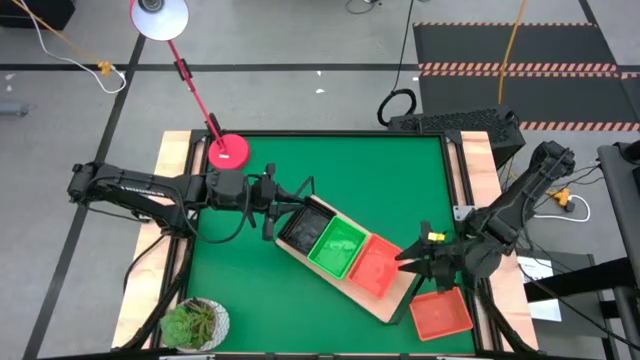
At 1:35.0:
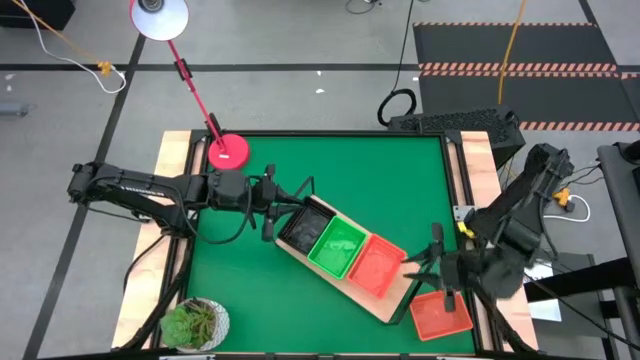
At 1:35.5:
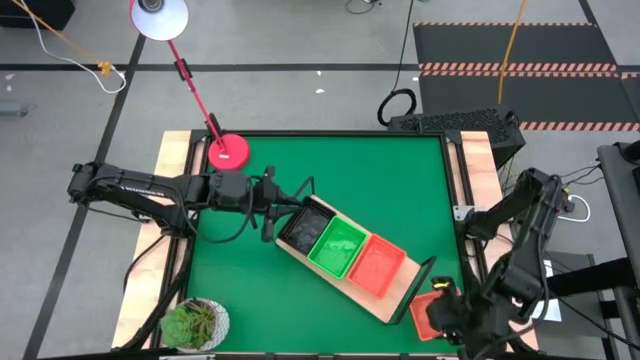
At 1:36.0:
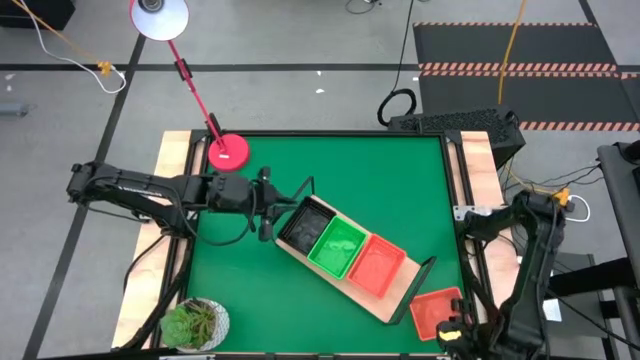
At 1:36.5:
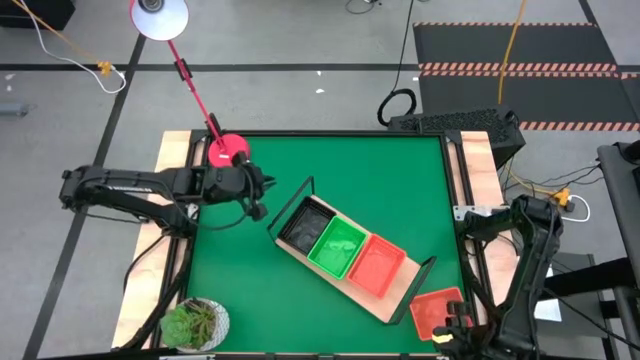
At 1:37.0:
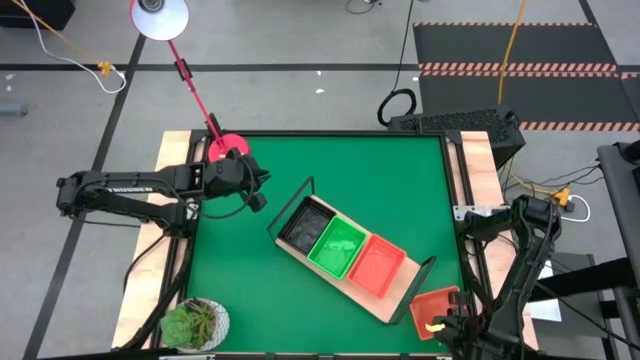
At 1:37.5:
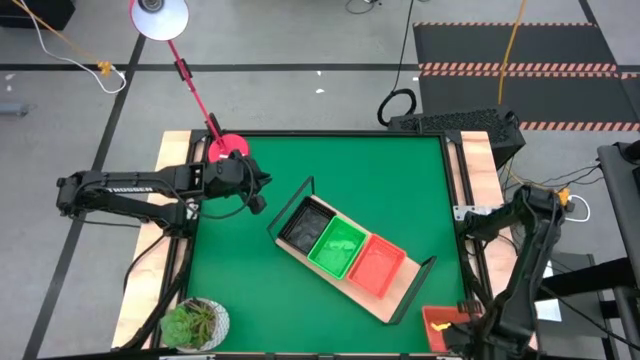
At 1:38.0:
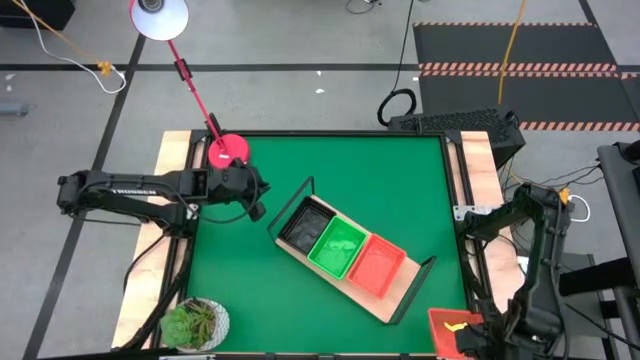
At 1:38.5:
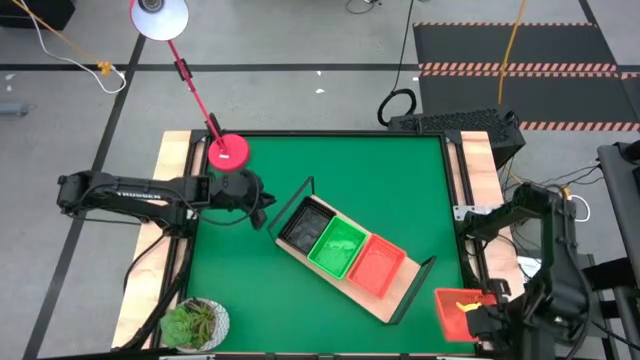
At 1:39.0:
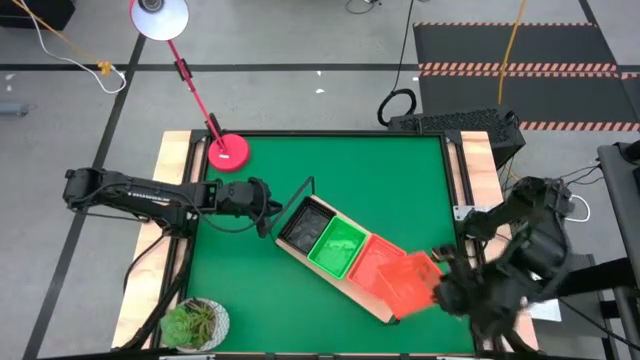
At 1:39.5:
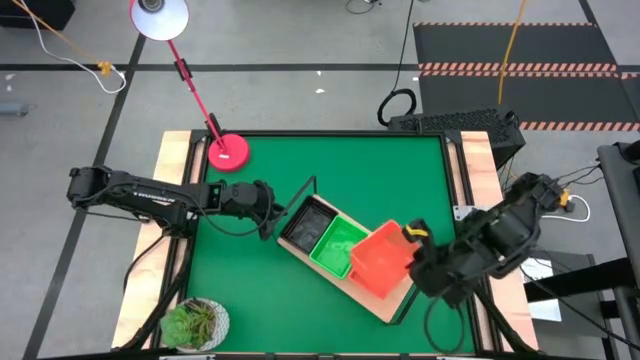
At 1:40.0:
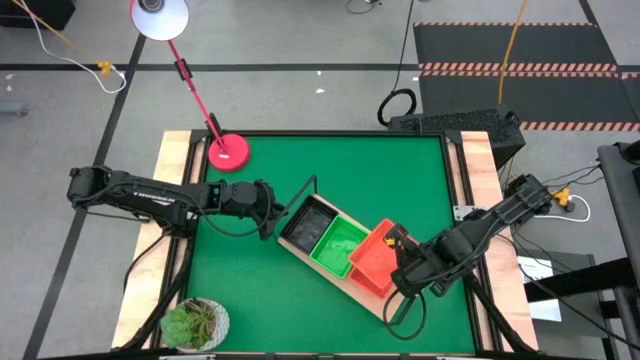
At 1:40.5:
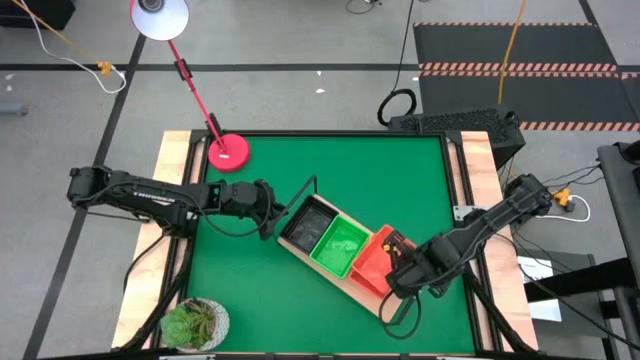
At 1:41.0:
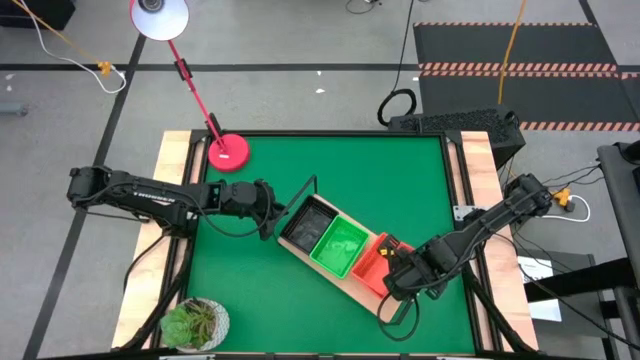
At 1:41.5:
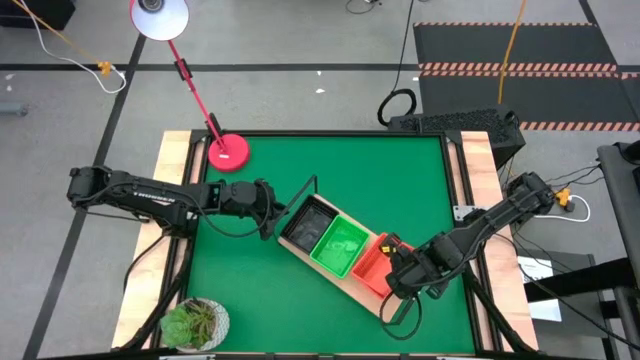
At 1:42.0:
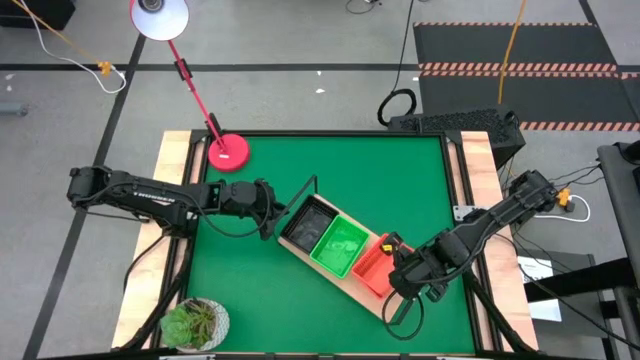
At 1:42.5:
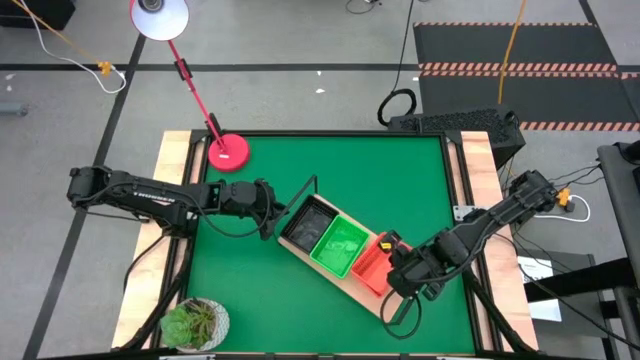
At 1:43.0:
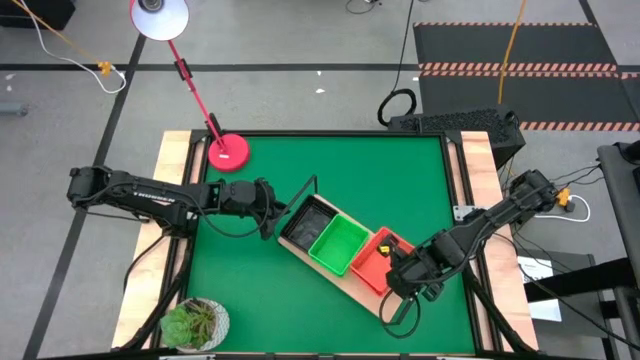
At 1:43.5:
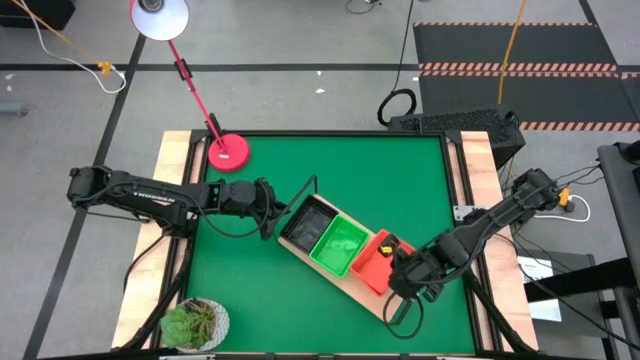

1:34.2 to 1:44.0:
Task: Stack baskets on shelf by color
Stack the orange bin on the orange bin on the shelf

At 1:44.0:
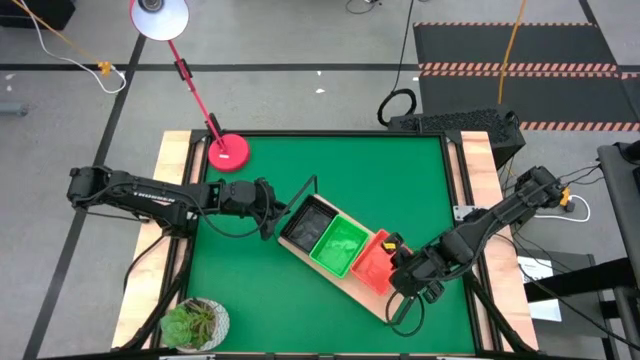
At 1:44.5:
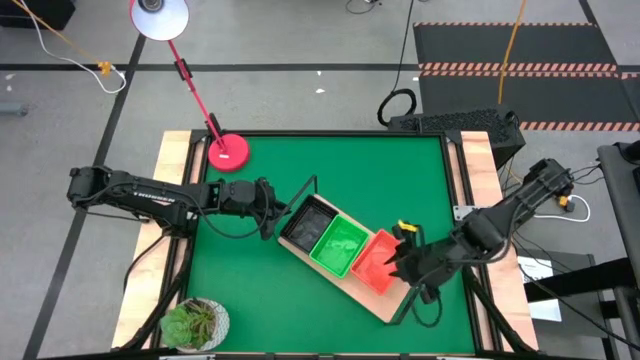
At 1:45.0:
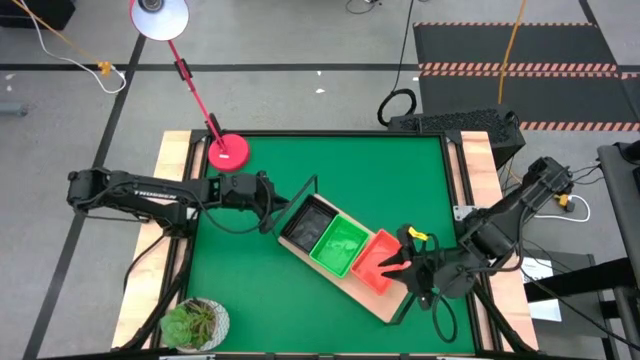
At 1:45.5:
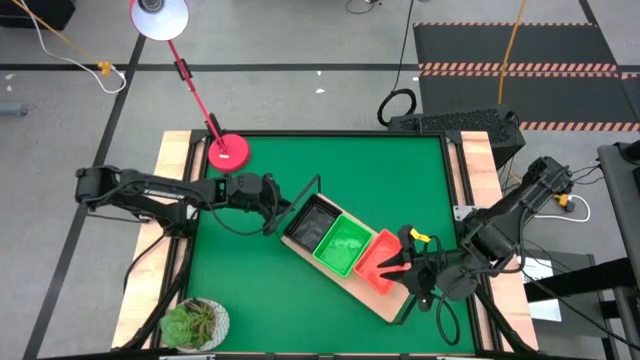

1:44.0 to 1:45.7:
Adjust the shelf

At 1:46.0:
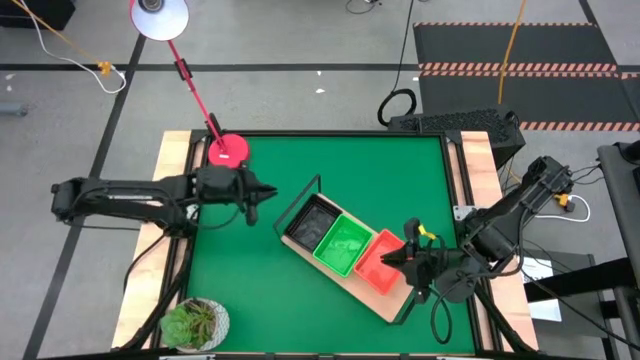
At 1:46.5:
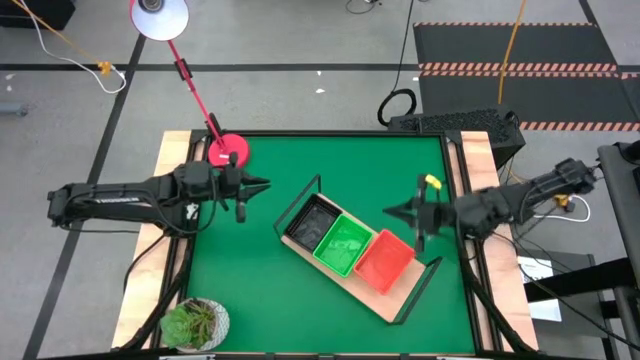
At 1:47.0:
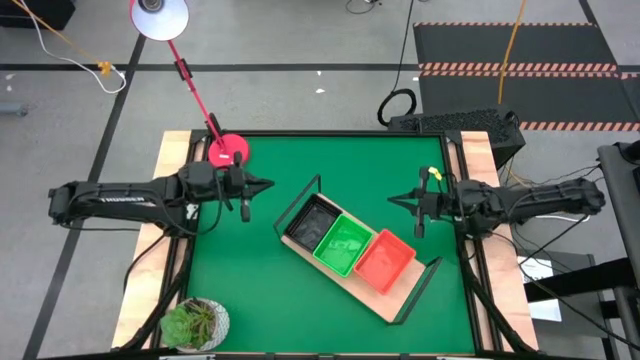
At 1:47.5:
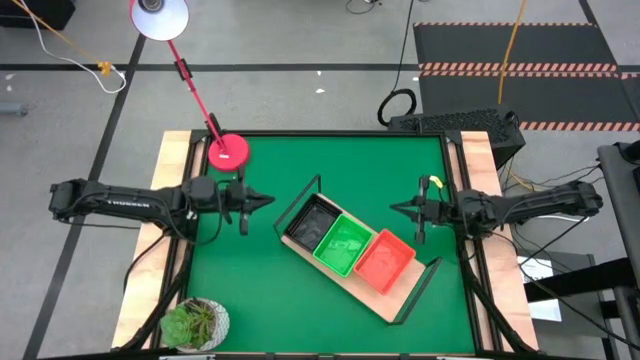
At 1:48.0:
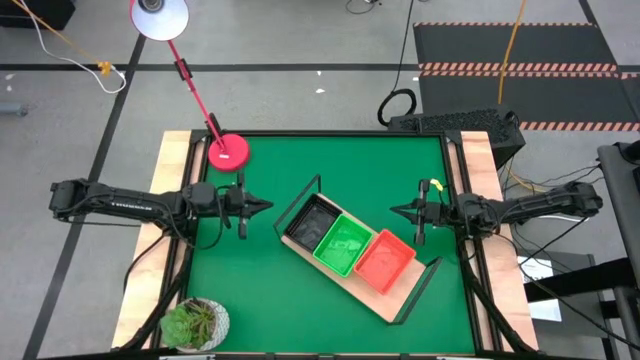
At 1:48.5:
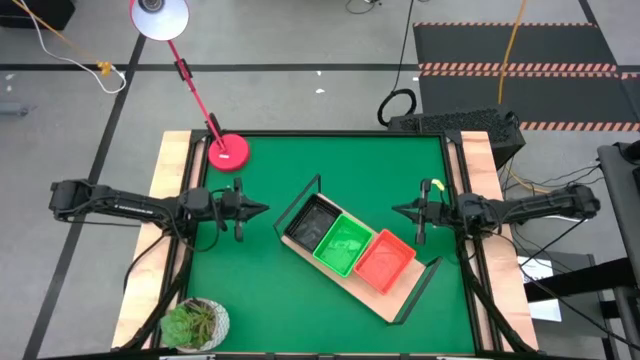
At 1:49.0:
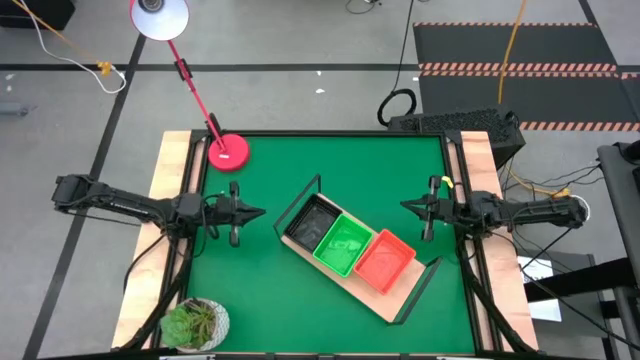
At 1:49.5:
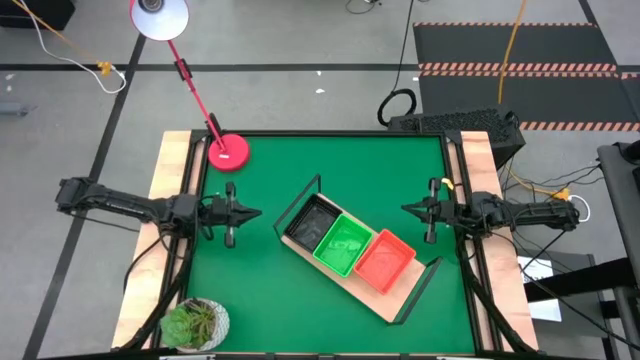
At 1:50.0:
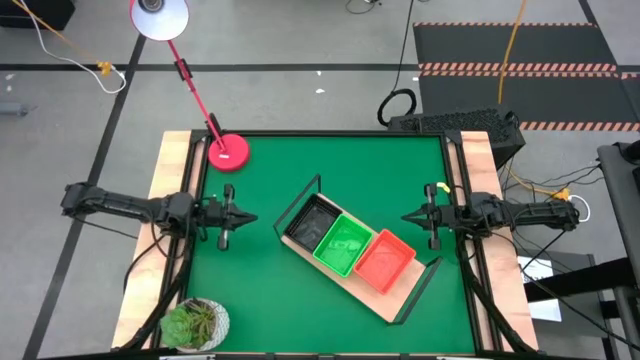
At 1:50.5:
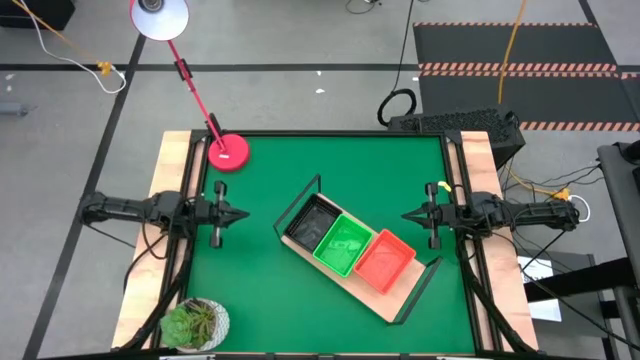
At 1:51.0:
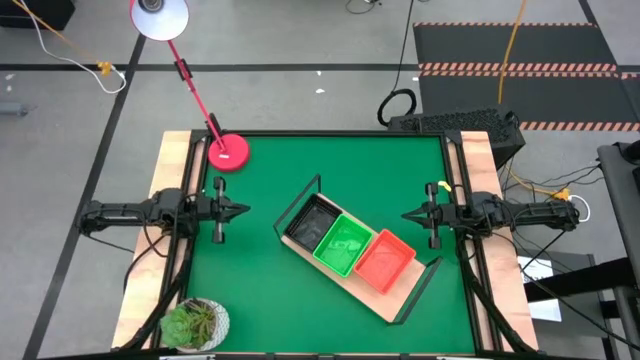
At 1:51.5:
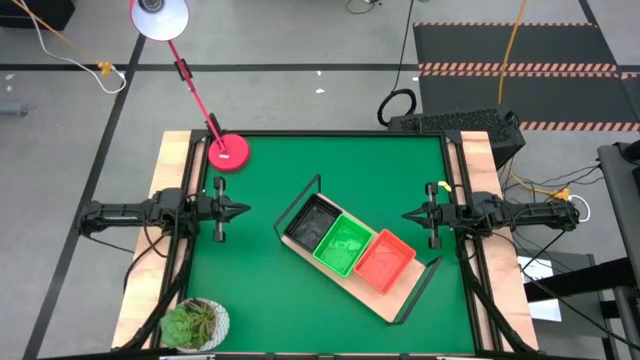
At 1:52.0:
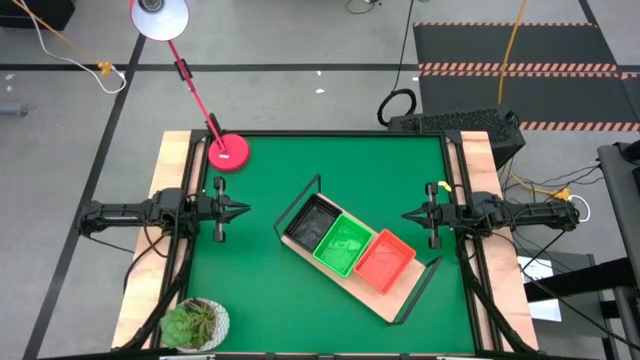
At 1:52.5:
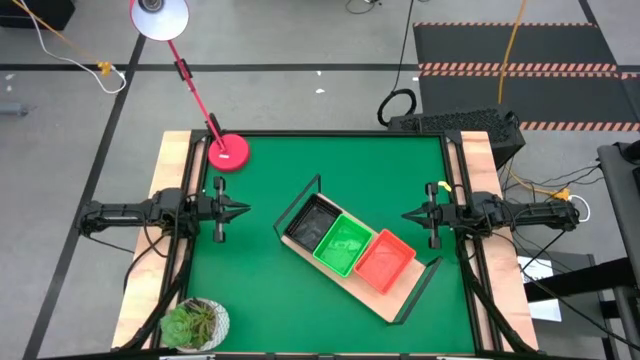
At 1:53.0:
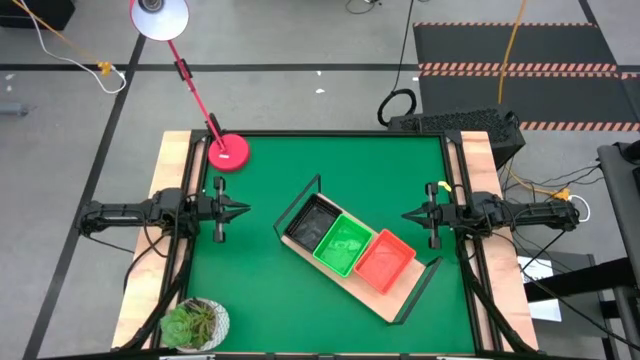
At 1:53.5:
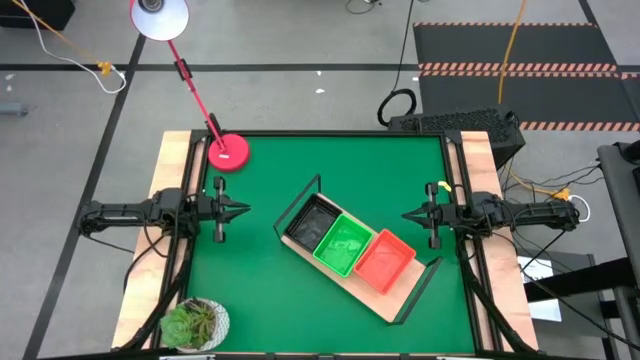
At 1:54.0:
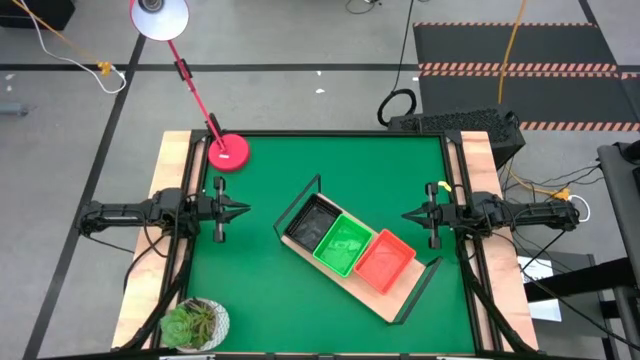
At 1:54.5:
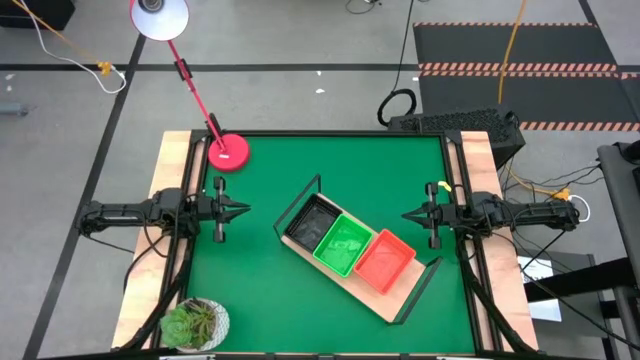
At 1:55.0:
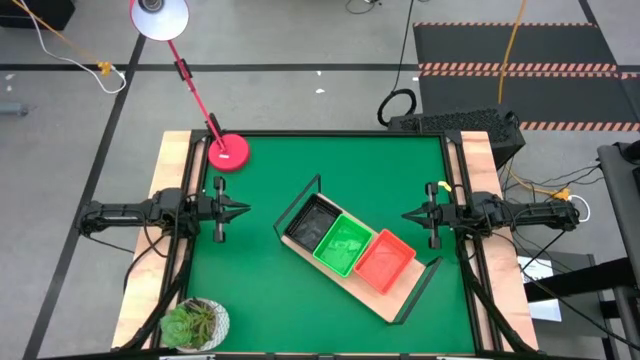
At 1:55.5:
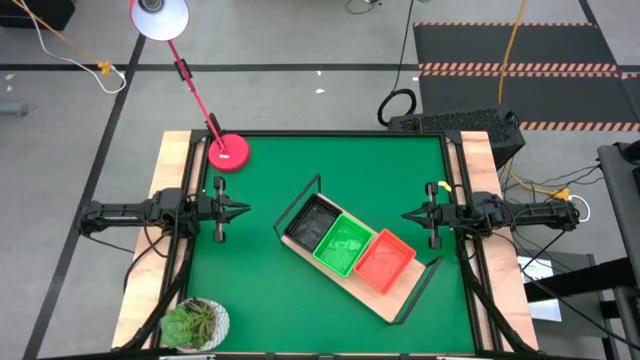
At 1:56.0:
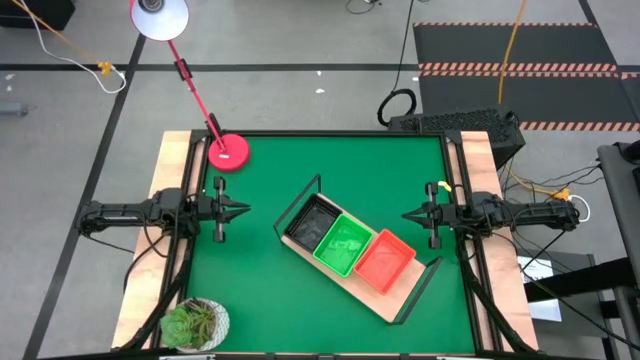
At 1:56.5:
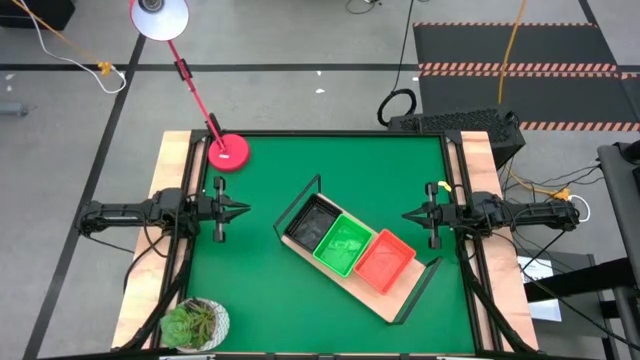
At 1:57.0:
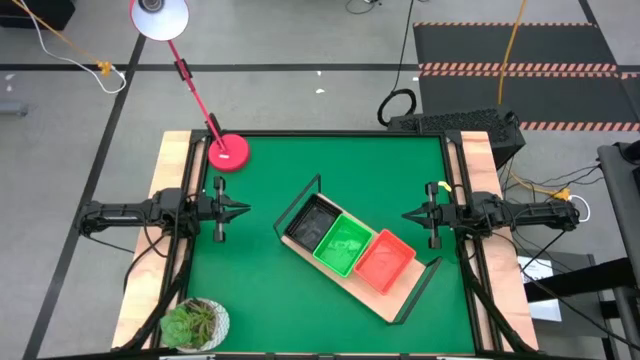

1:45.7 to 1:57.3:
Return to Home Position
